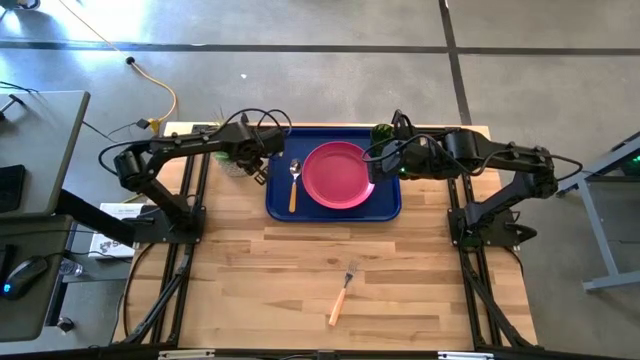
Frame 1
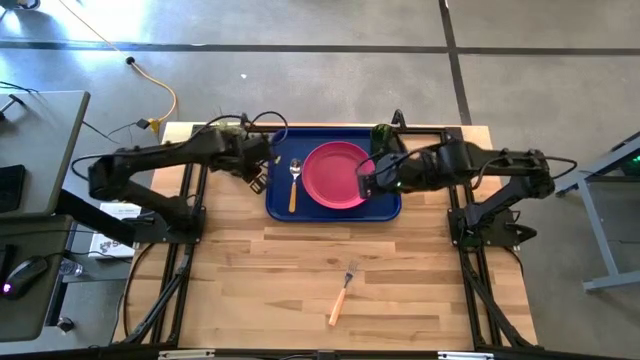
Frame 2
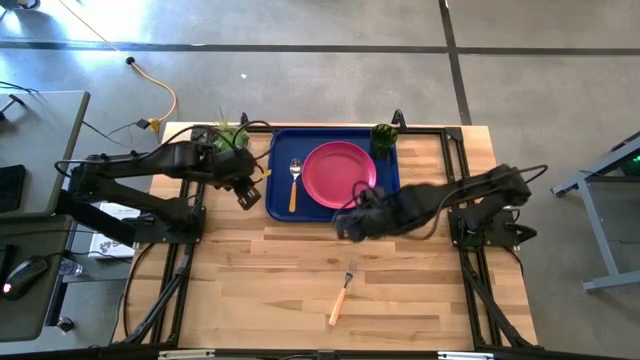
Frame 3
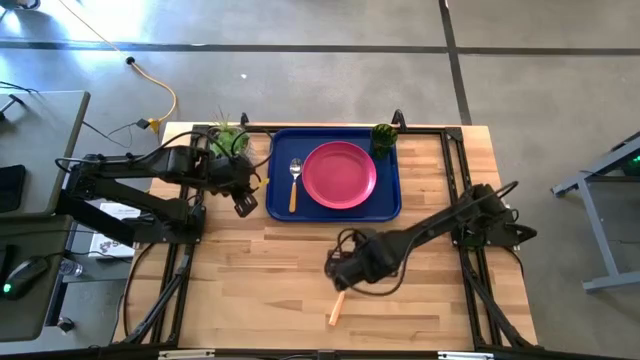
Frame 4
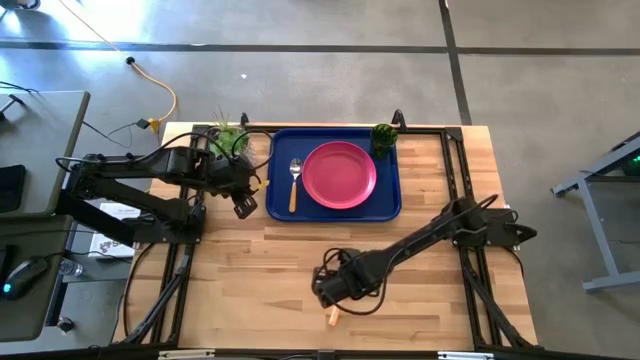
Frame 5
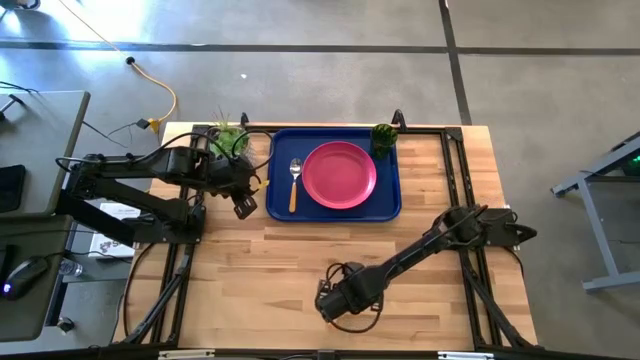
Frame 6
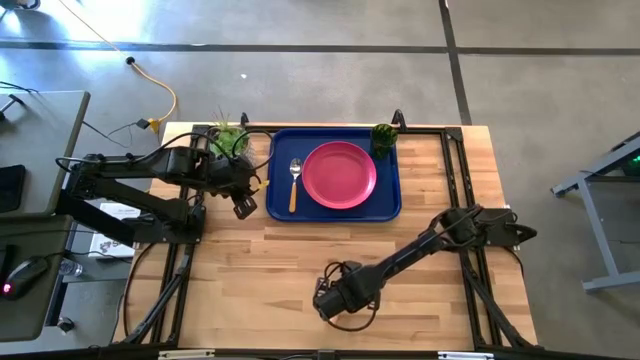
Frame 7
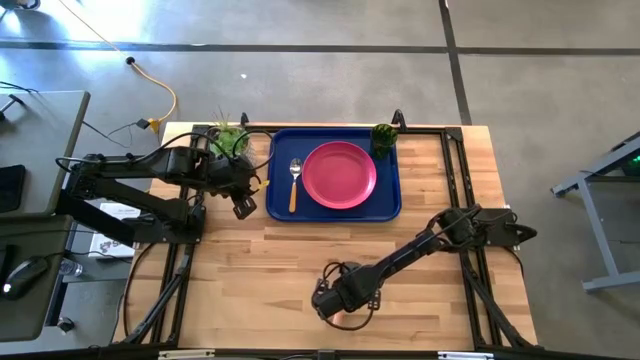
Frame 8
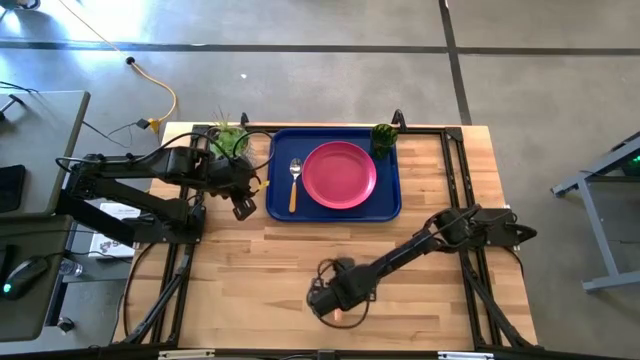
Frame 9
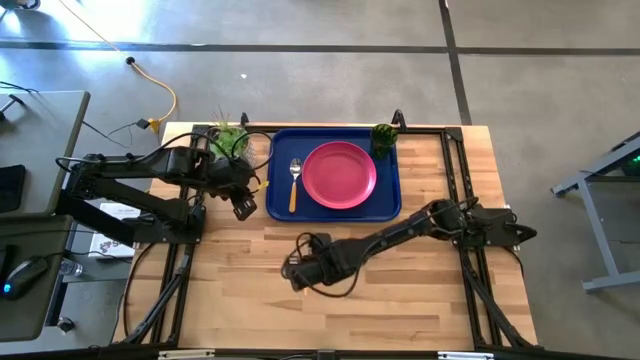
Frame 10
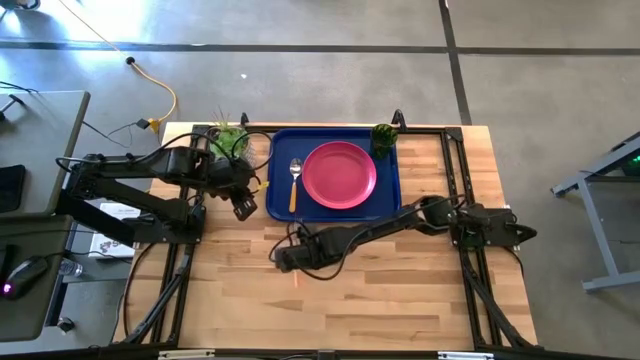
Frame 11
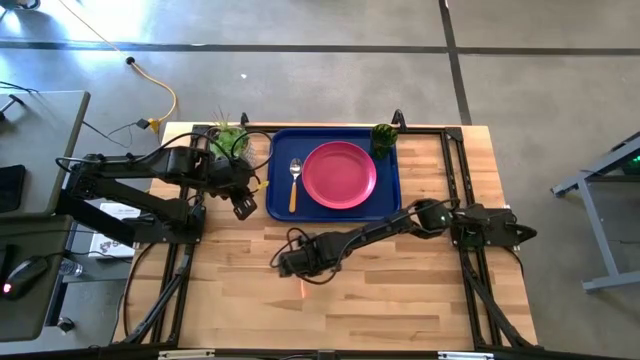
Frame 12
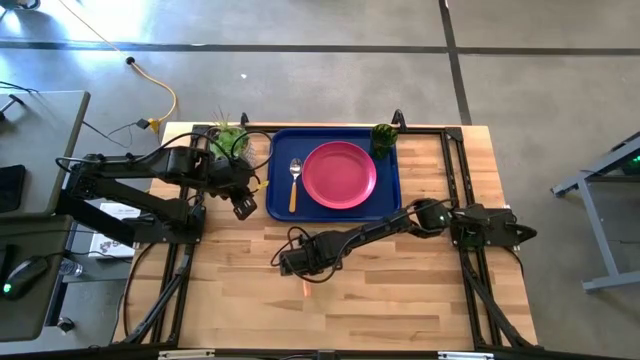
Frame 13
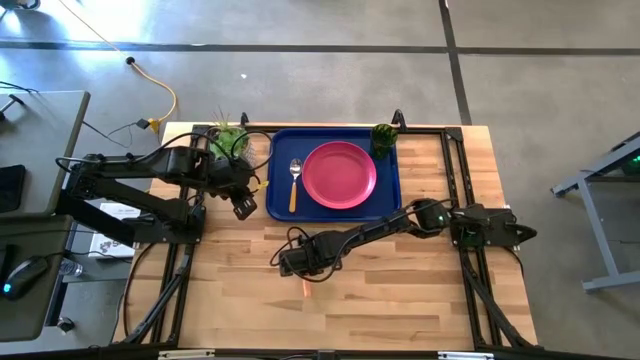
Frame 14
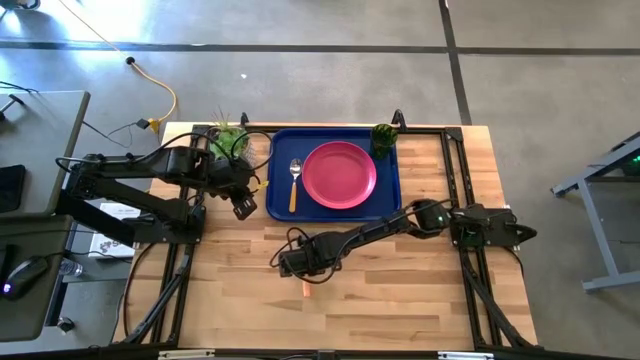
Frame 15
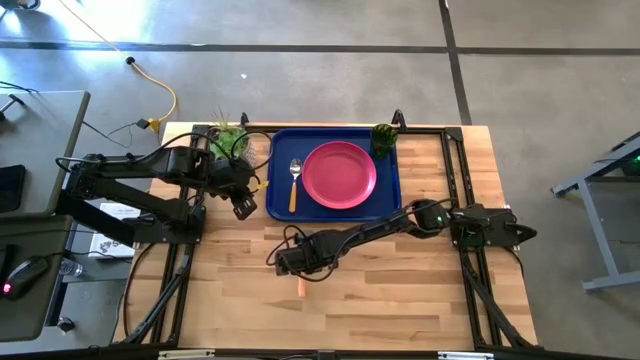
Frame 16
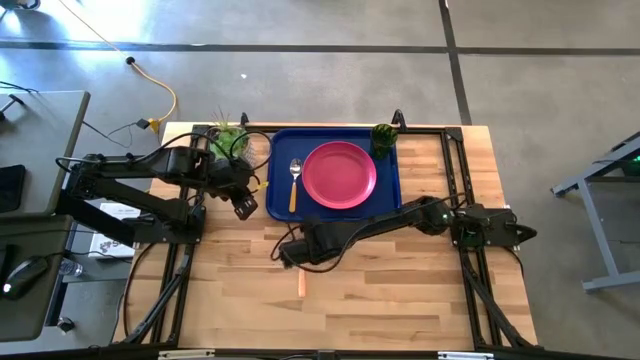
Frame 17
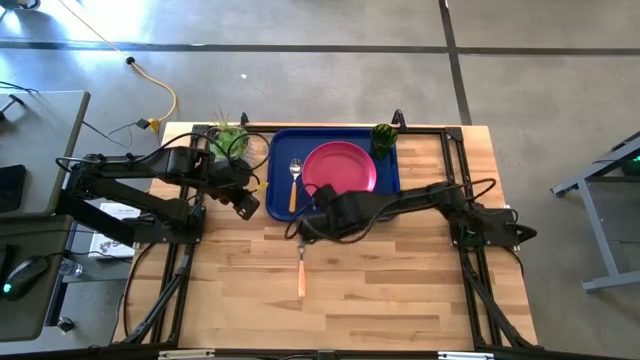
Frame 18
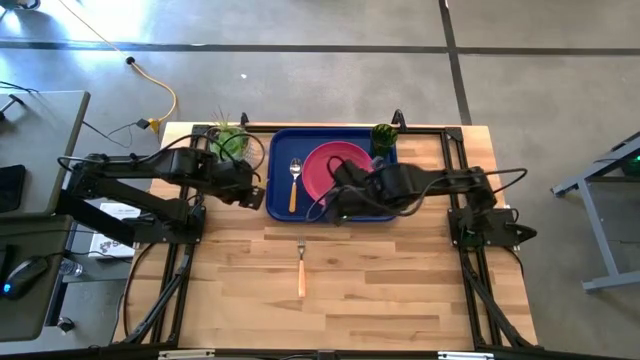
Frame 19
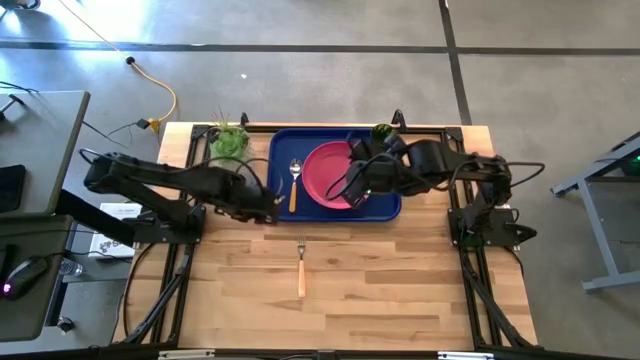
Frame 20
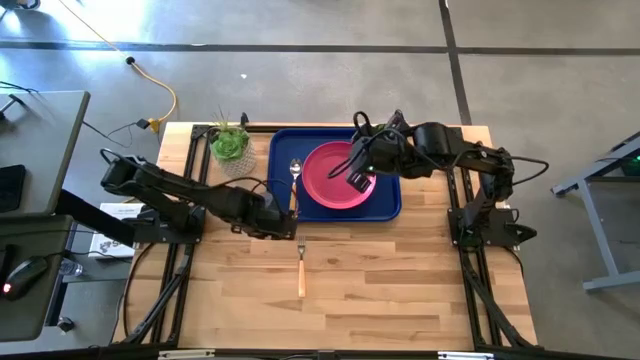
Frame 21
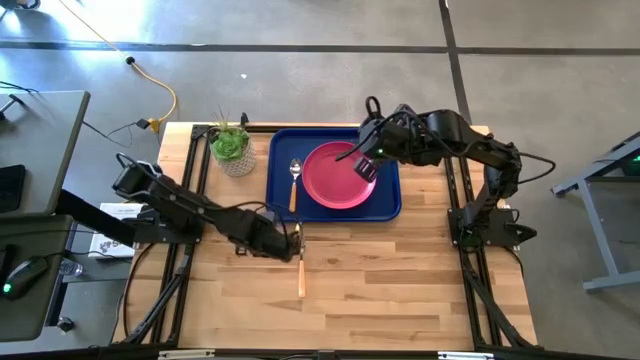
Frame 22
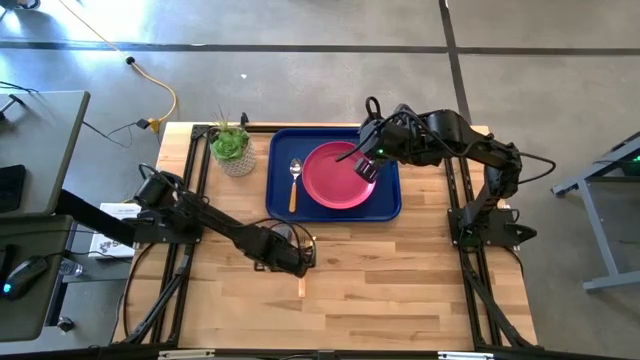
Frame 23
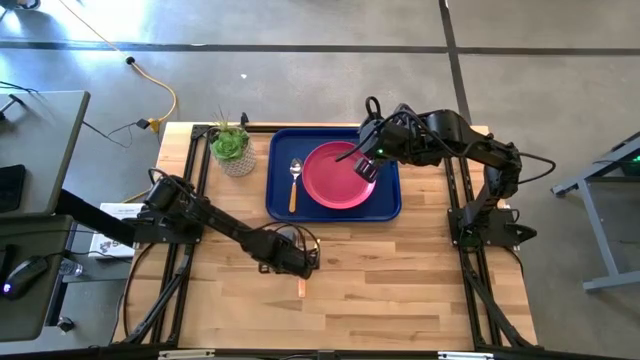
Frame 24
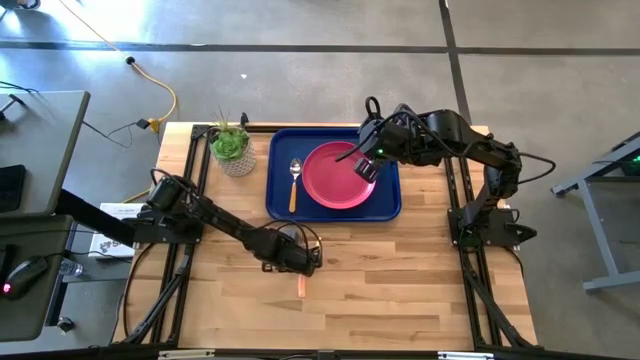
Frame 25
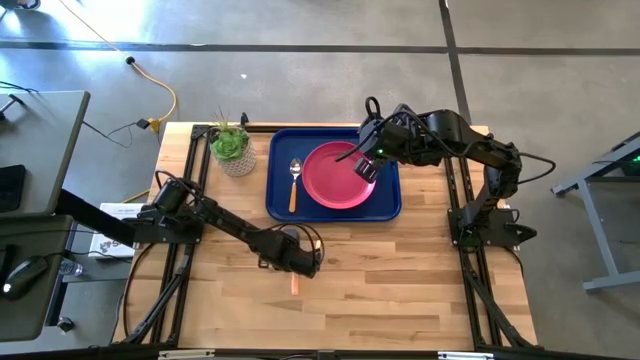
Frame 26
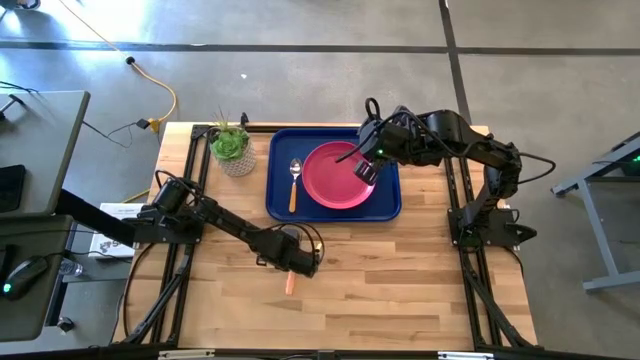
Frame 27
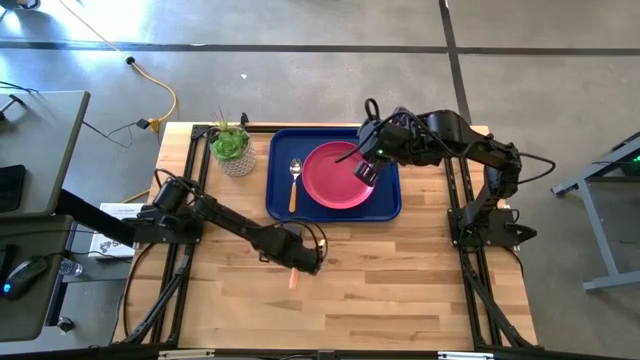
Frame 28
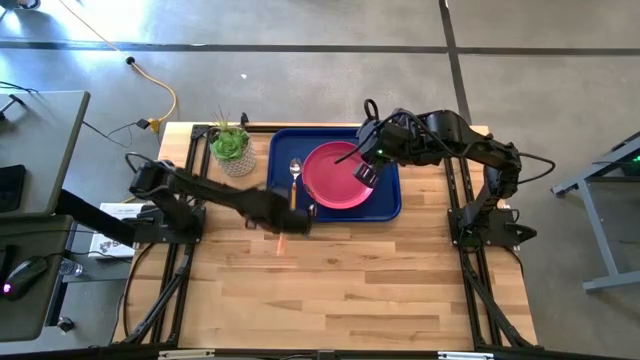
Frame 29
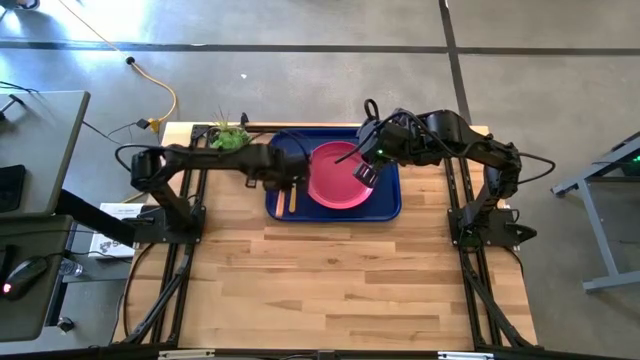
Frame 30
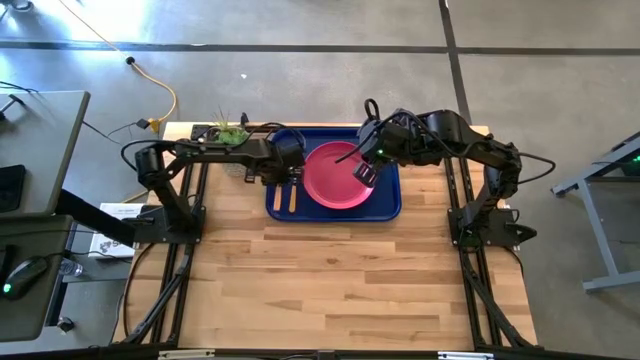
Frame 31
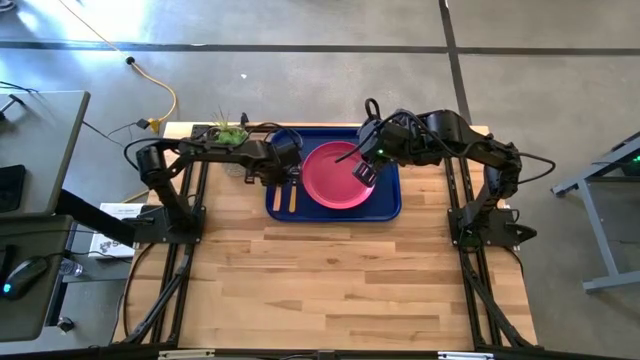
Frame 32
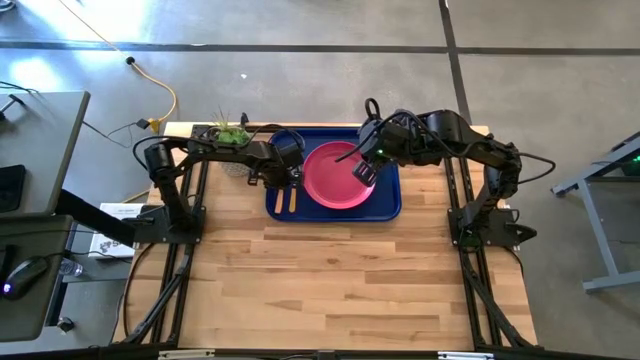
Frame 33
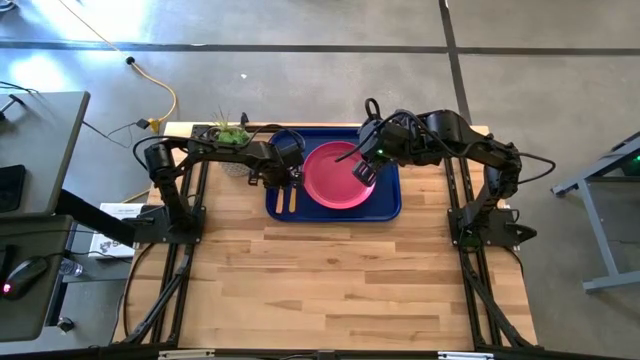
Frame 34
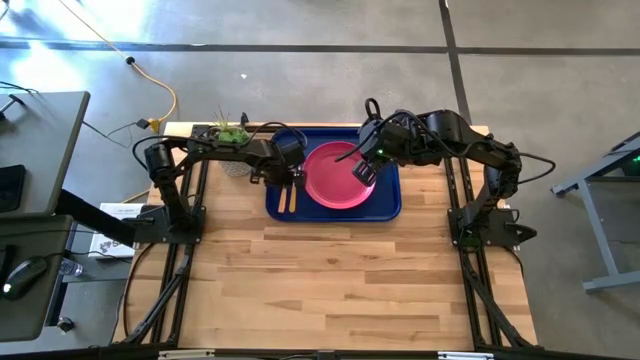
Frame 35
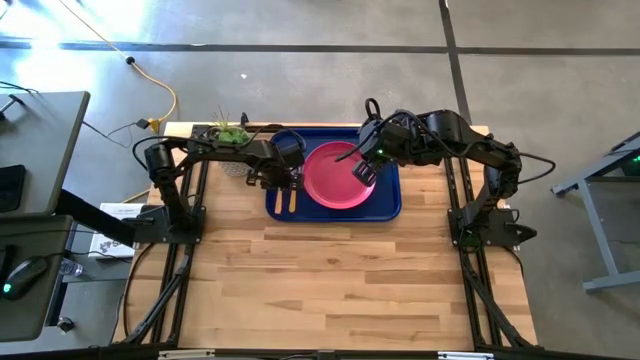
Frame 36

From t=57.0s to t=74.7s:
Task: Pick and place plate/cup/fork/spoon on tray
Put the yellow fork on the blue serving tray to the left side of the orange spoon

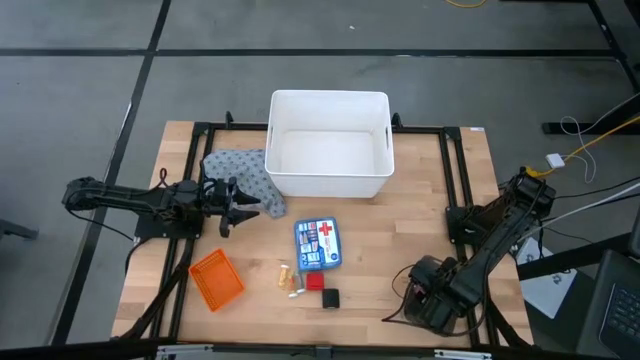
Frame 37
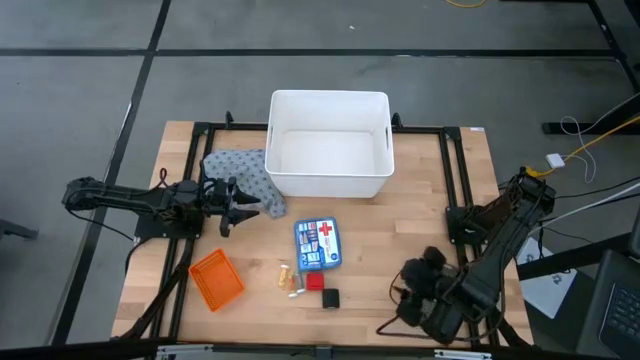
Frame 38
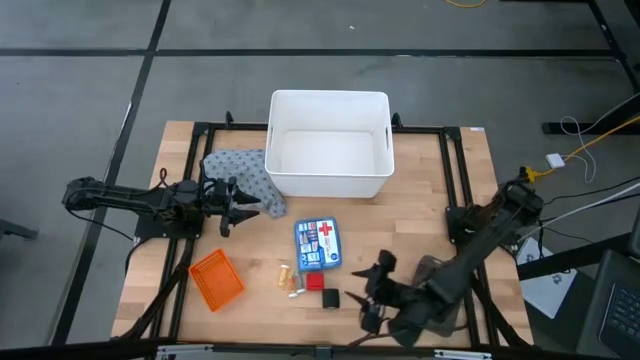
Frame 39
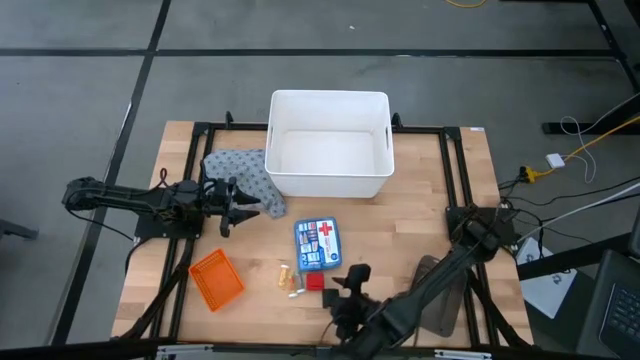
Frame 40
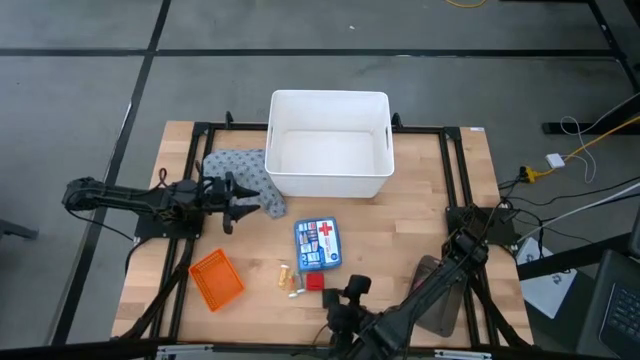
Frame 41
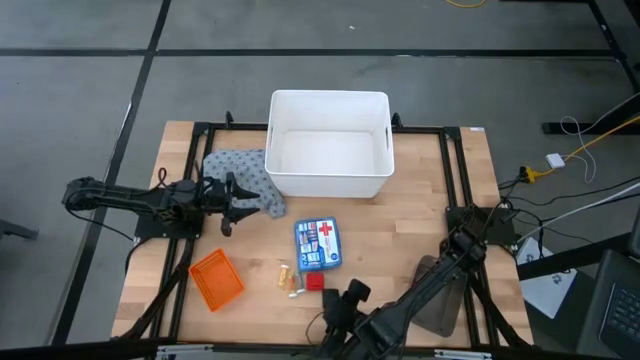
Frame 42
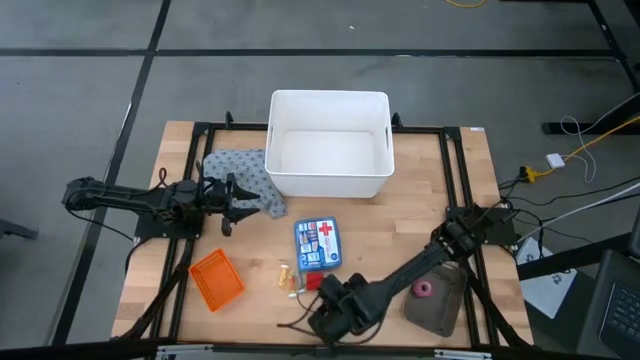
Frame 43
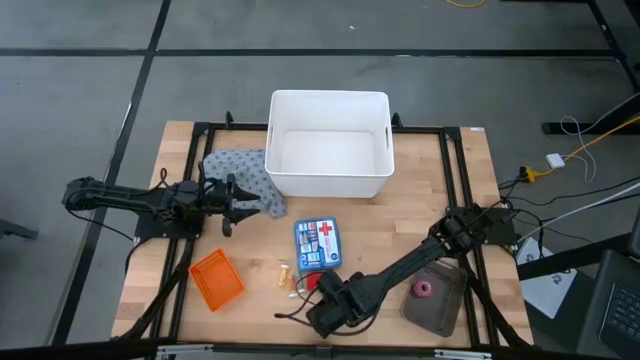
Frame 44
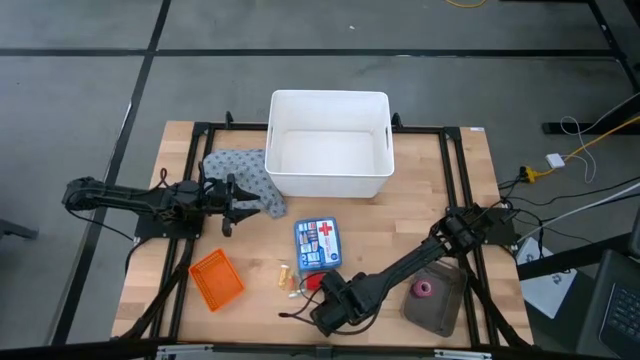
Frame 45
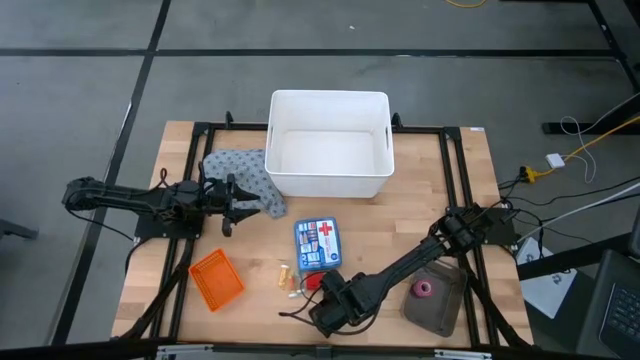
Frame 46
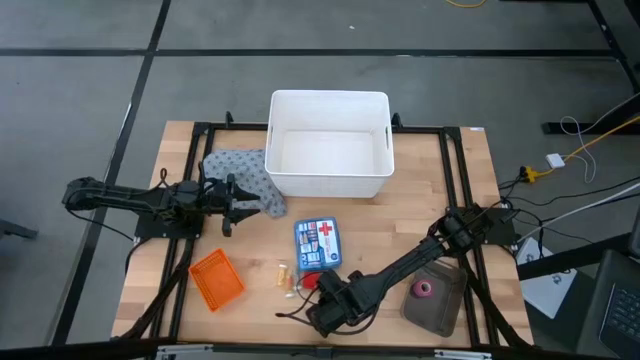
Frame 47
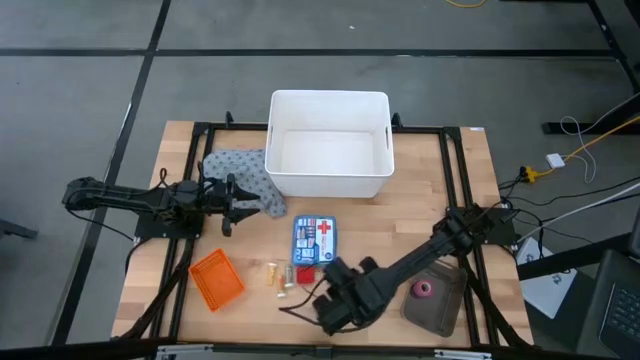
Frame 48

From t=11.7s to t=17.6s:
Task: Pick & place medical supplies in basket/bin
Put the black bandage into the black bin
